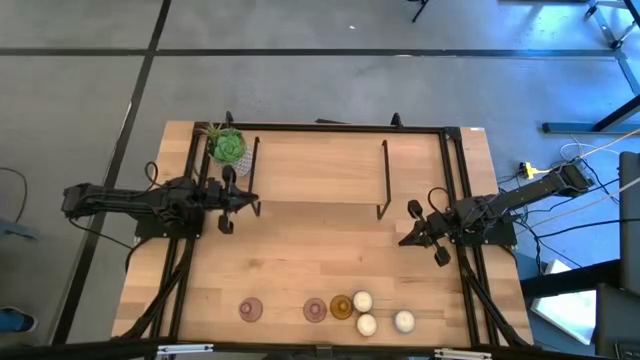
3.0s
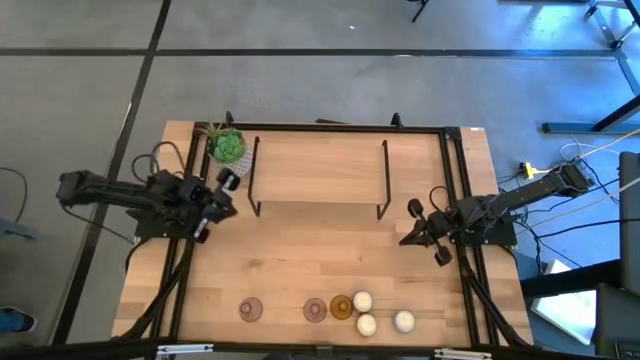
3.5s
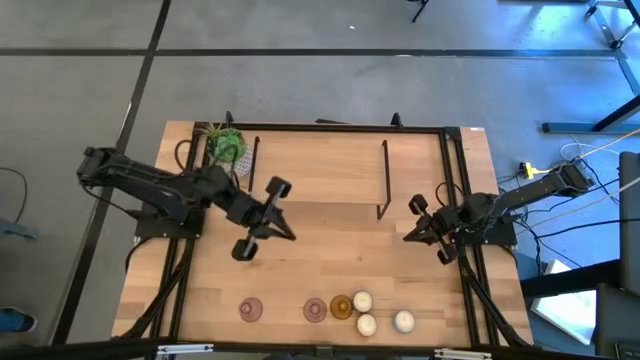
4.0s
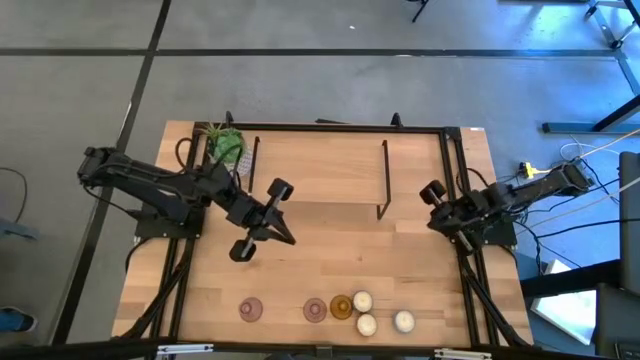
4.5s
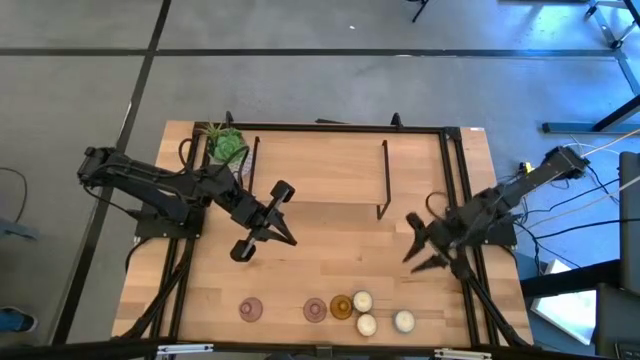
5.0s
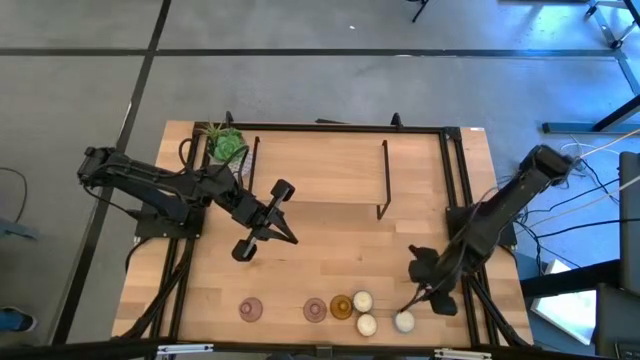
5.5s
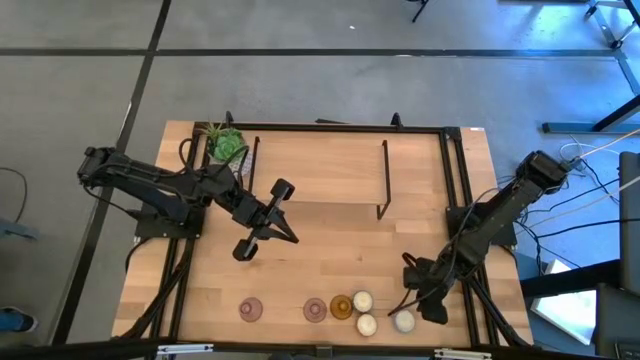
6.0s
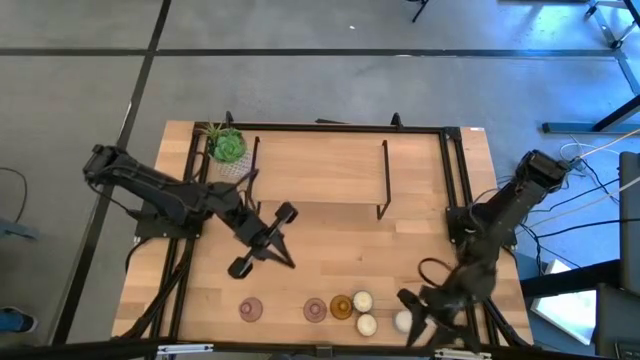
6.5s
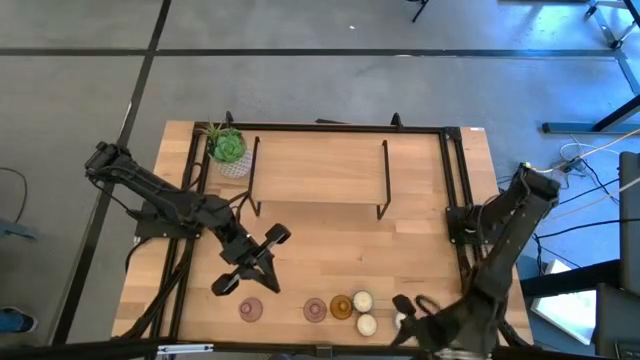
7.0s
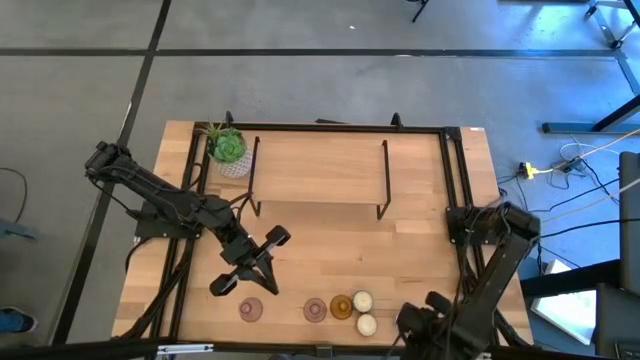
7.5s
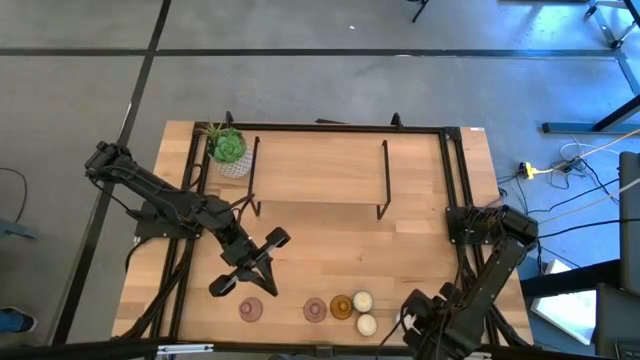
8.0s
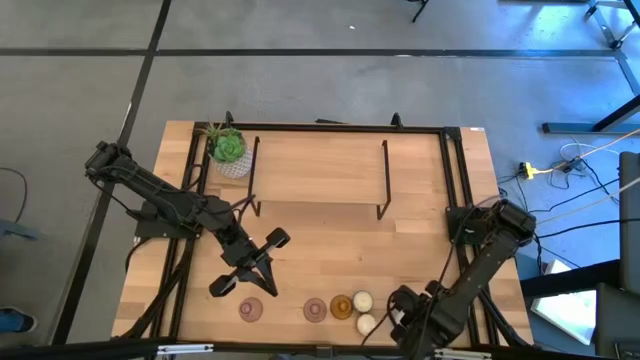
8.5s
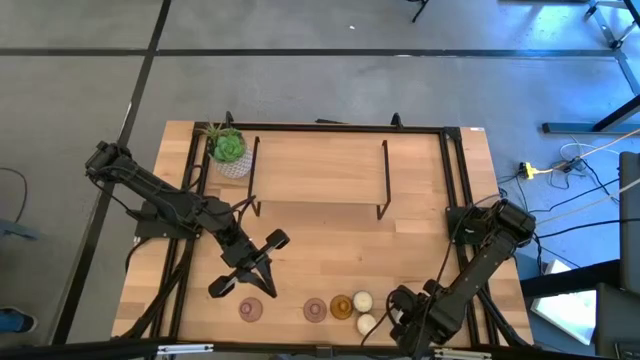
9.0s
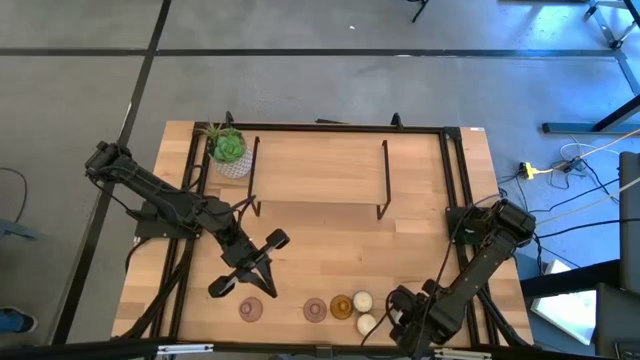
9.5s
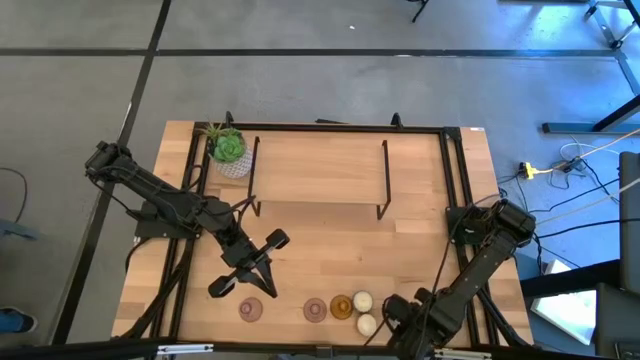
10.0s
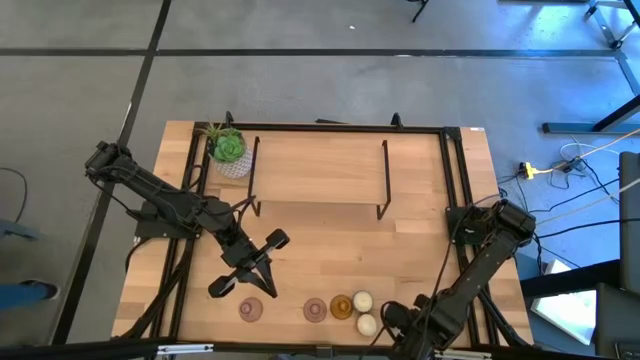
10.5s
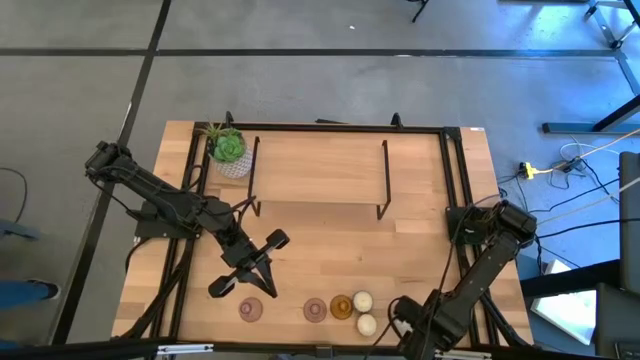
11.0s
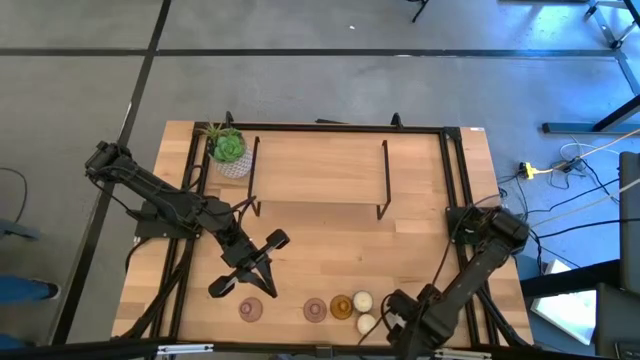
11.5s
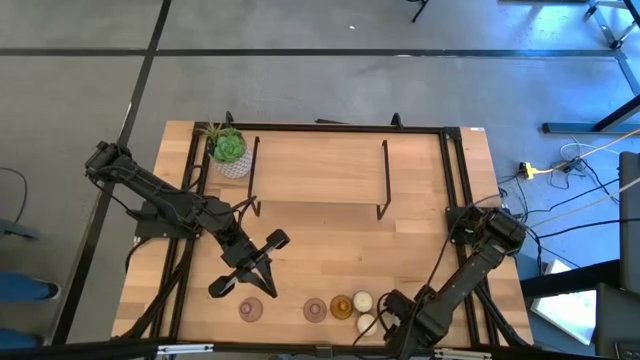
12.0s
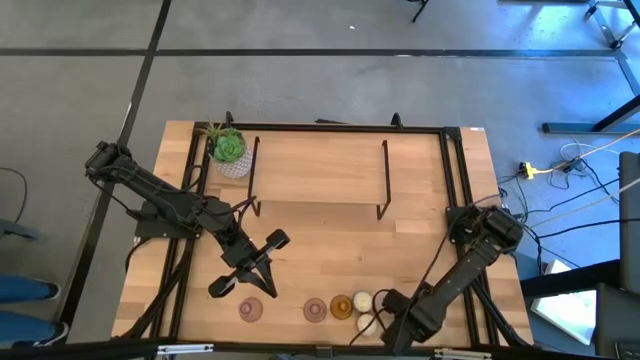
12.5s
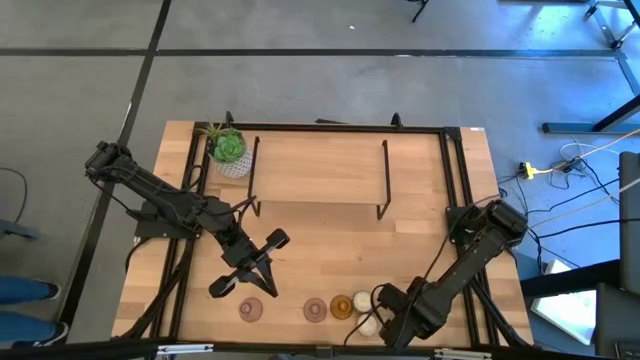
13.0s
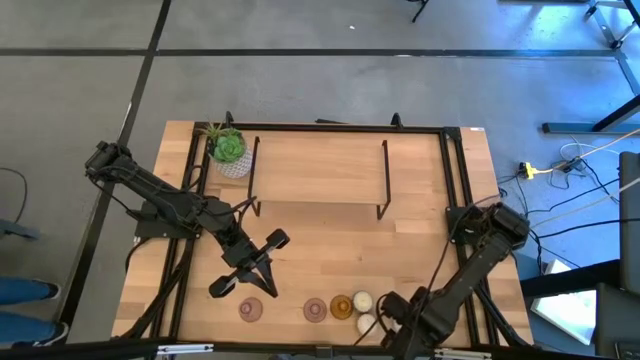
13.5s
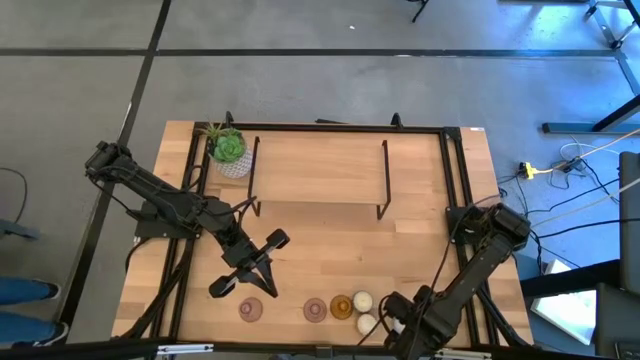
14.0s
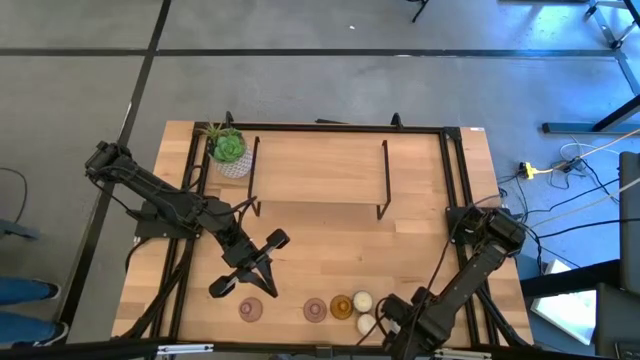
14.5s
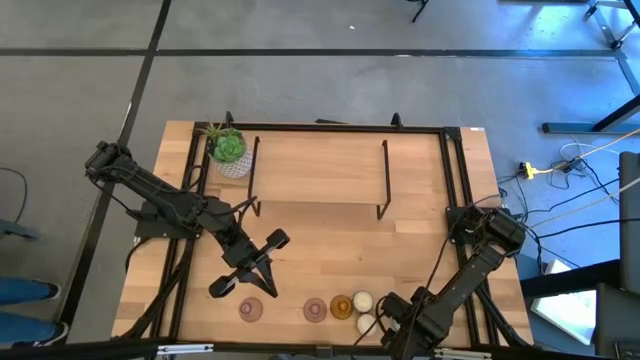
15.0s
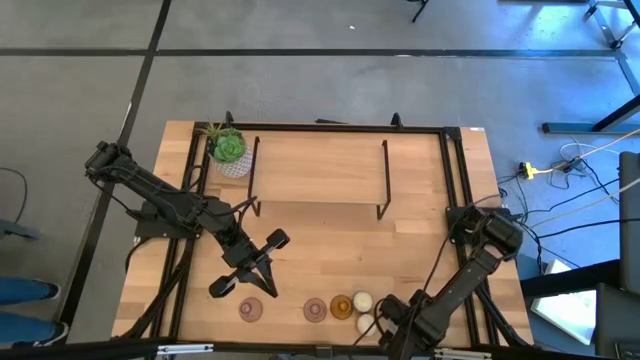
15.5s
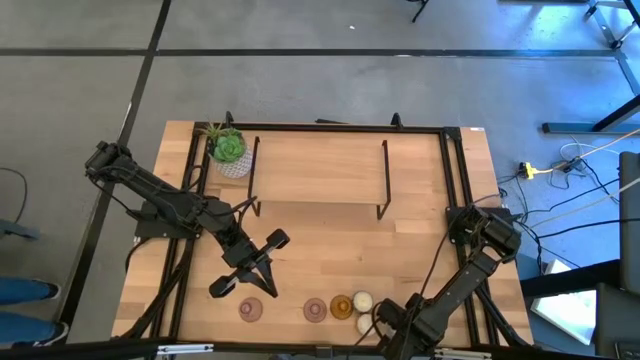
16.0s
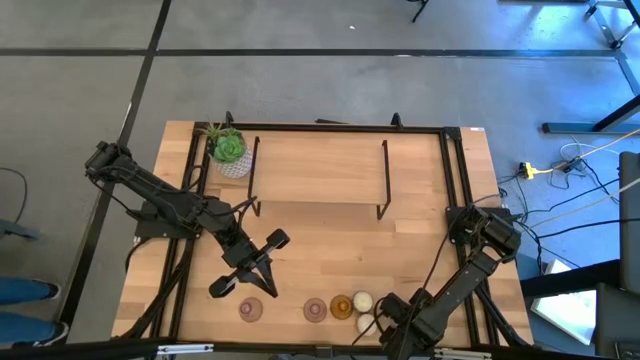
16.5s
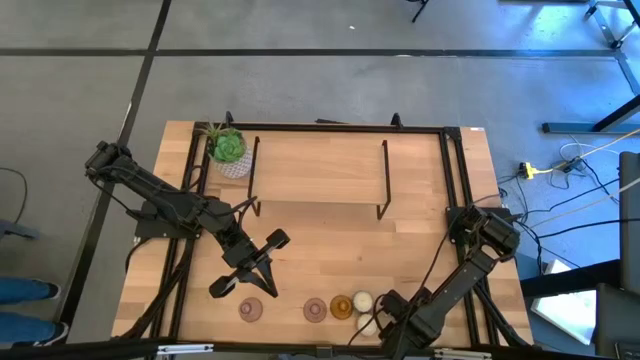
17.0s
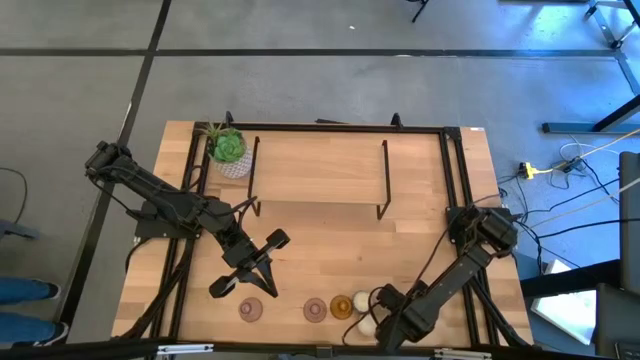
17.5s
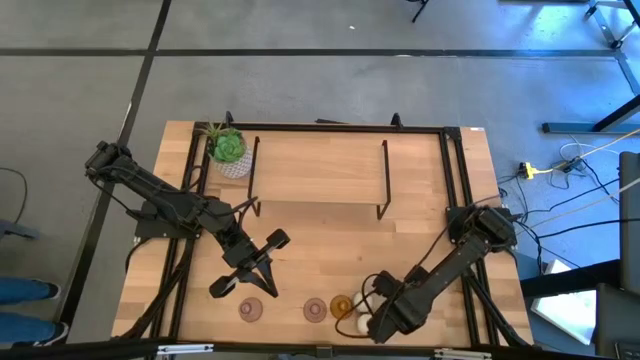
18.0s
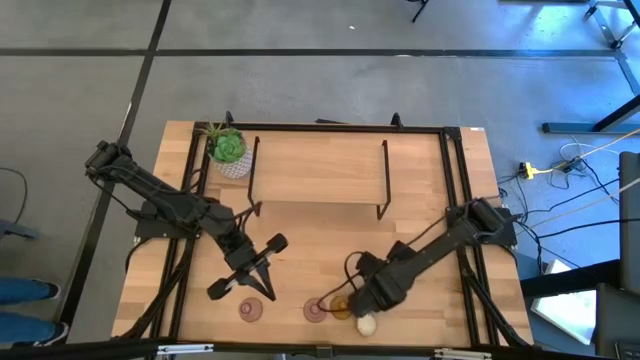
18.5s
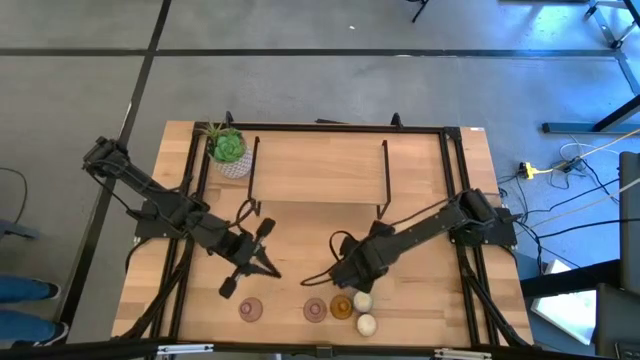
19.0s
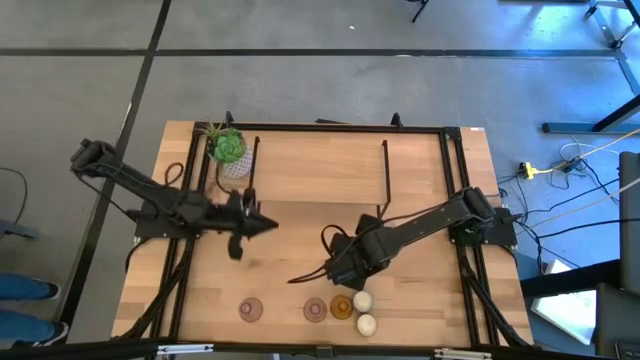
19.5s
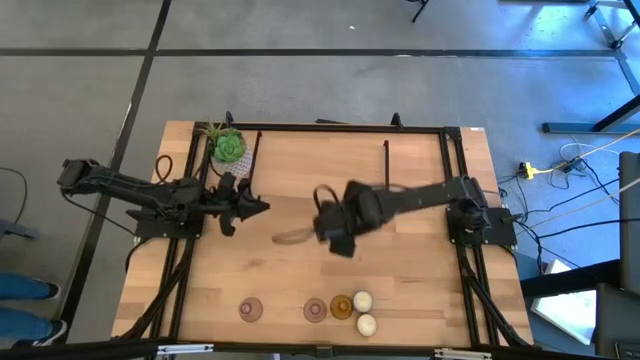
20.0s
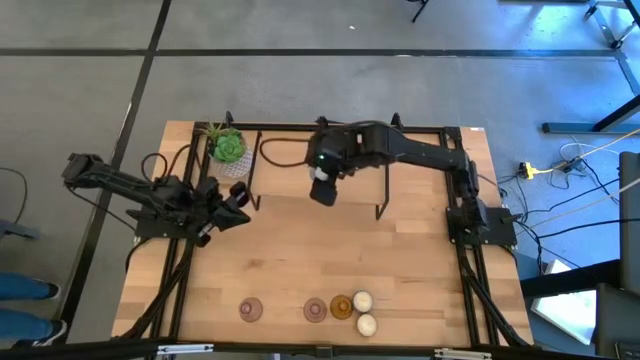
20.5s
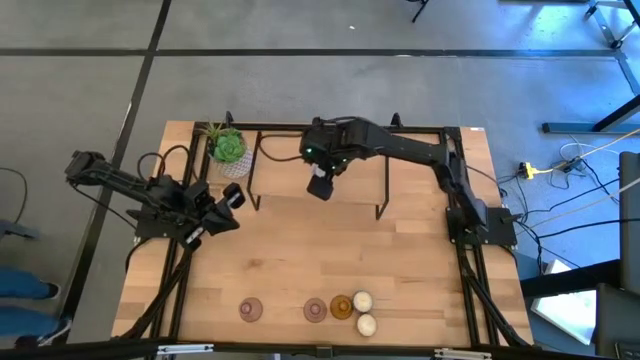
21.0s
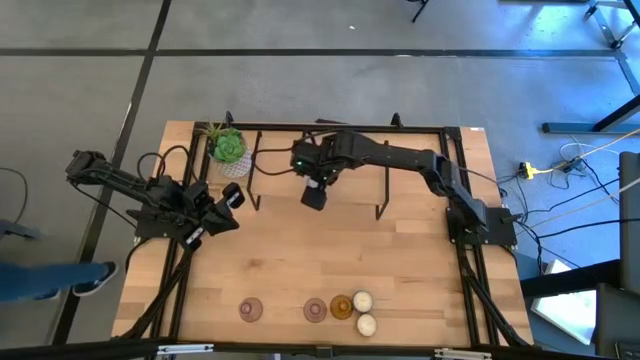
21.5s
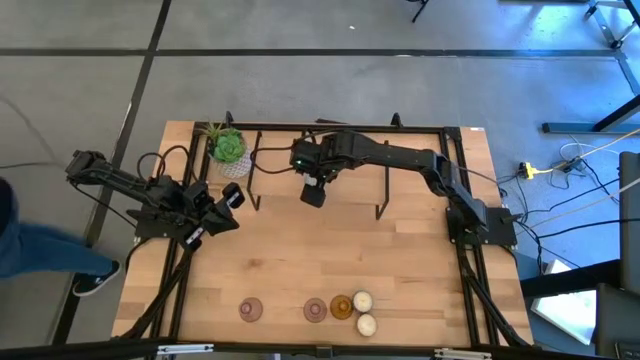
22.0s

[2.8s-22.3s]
Task: Pick & Place candle stick holders
Put the light blue scented candle on the shelf

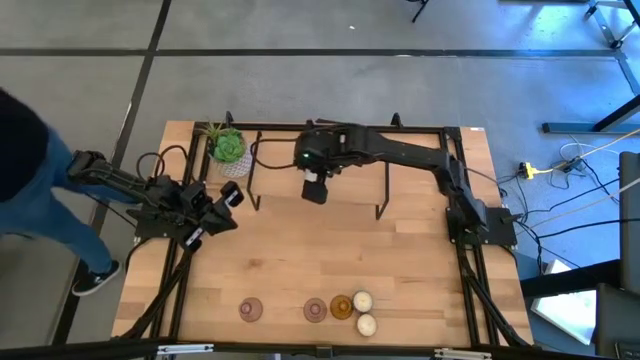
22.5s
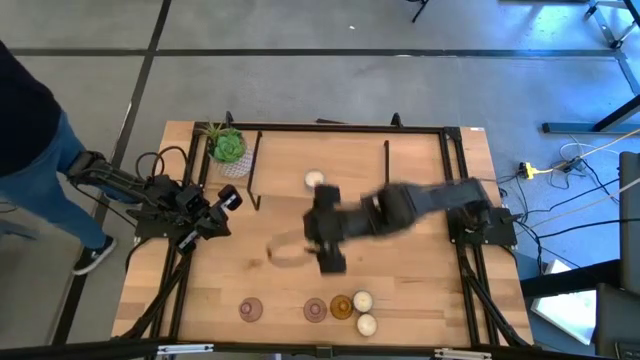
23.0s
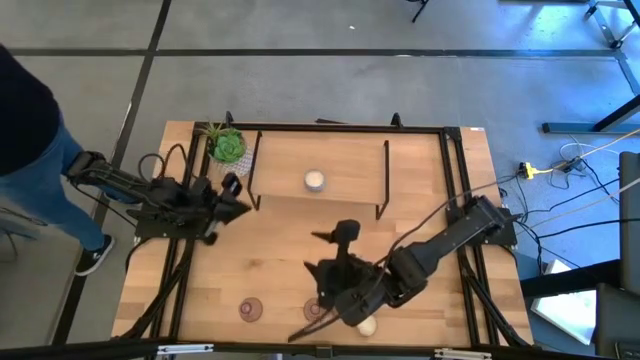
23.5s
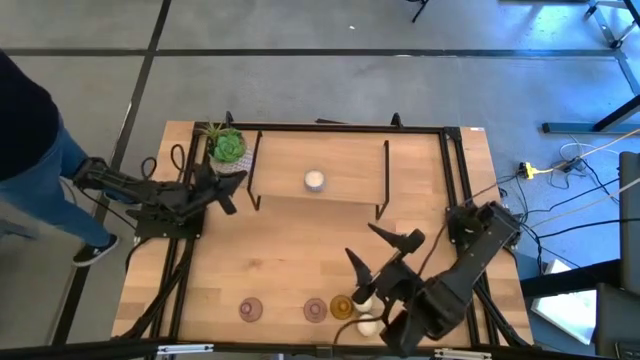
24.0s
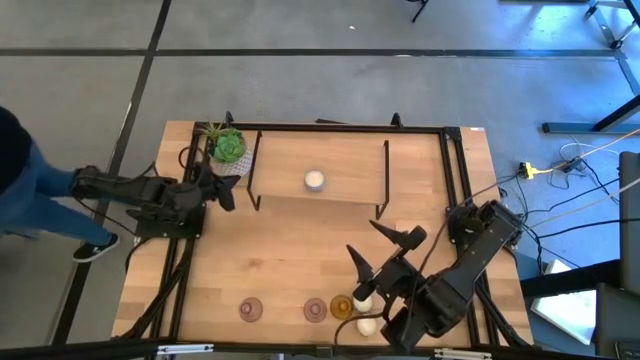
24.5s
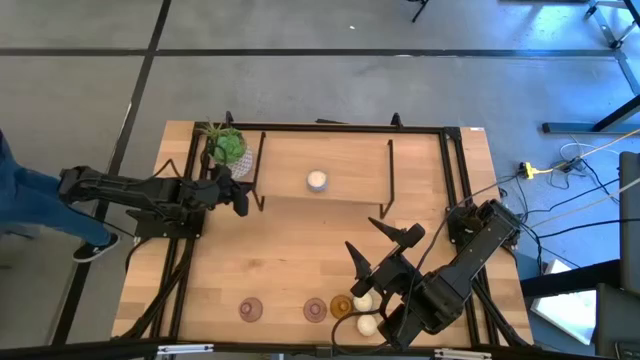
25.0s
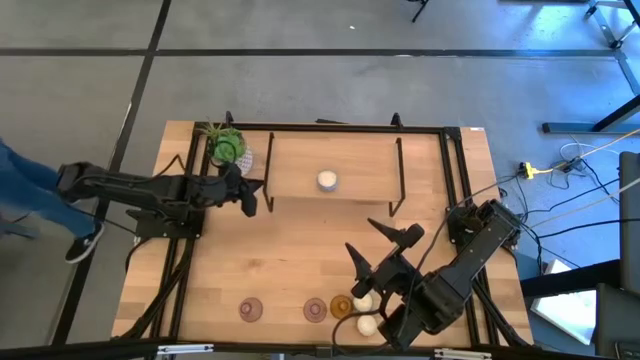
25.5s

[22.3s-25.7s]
Adjust the shelf
